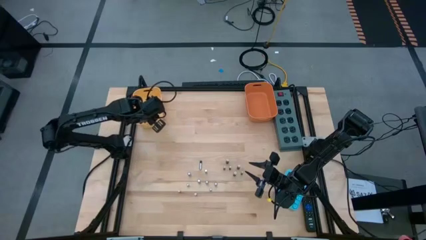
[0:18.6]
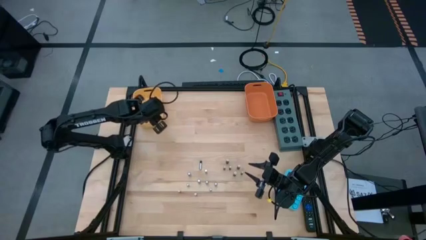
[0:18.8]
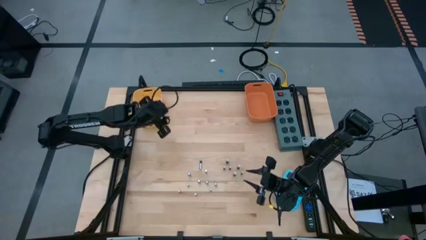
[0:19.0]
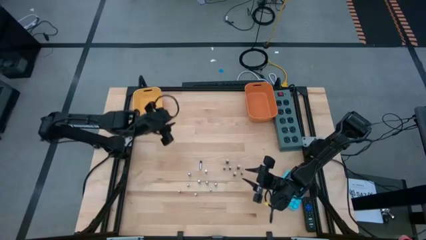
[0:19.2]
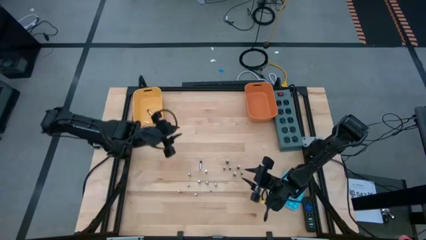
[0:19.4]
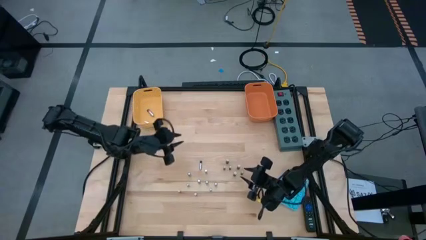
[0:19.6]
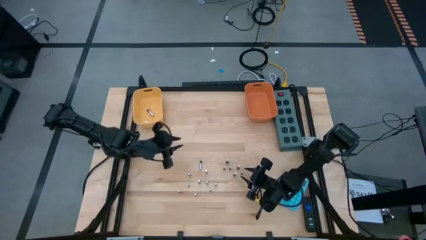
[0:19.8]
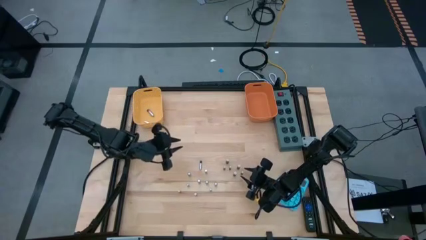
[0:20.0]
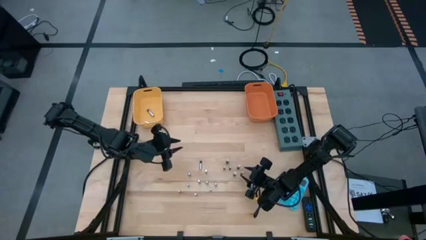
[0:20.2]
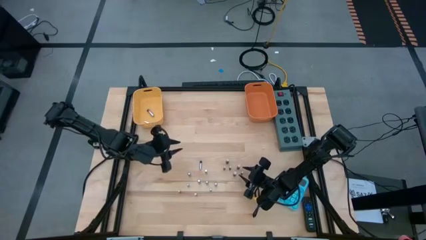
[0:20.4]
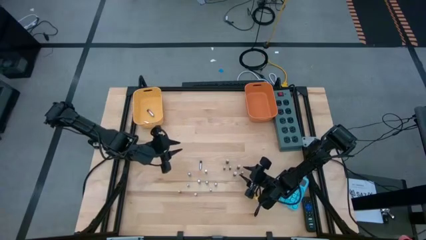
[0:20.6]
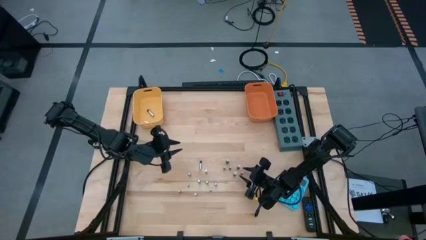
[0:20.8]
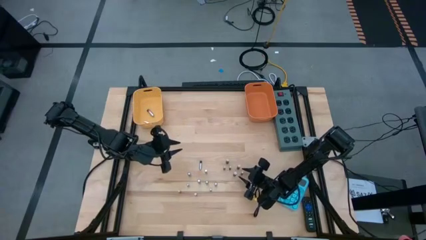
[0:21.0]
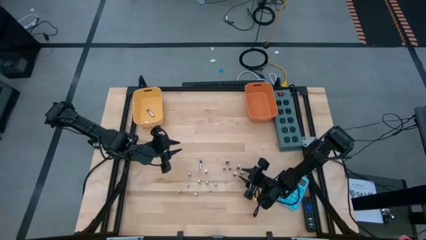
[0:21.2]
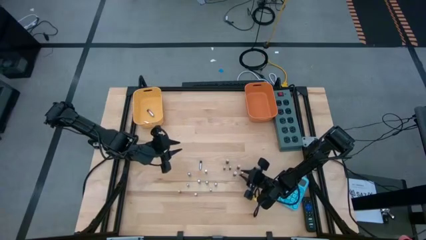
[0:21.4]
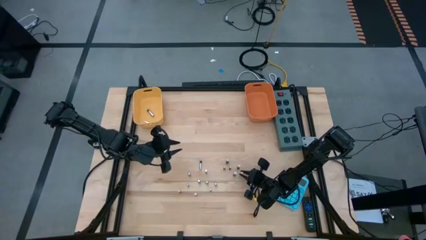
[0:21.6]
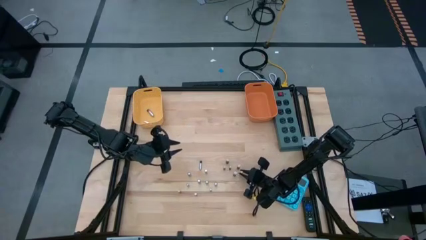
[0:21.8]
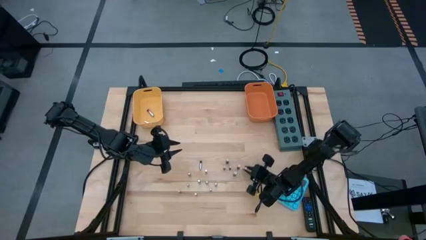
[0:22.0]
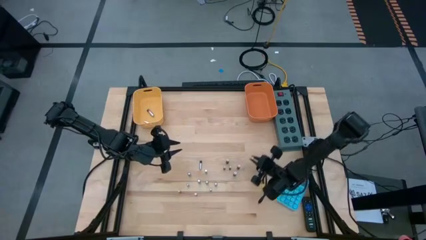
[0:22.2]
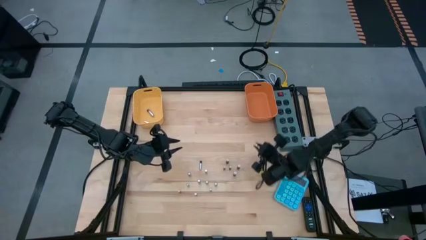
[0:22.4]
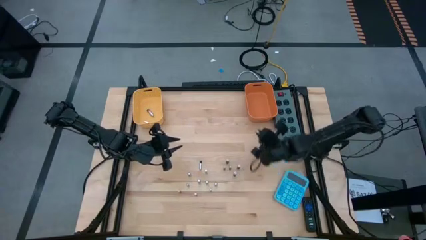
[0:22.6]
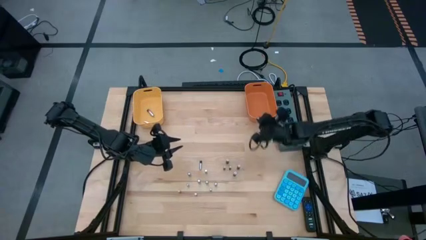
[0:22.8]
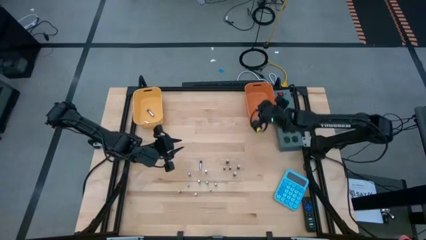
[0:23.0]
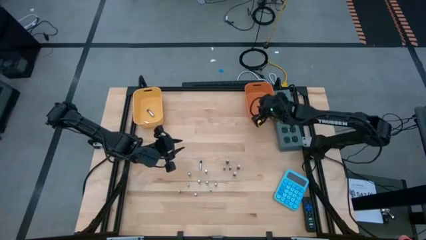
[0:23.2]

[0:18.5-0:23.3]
Task: Sort batteries
Put the black battery into the orange bin

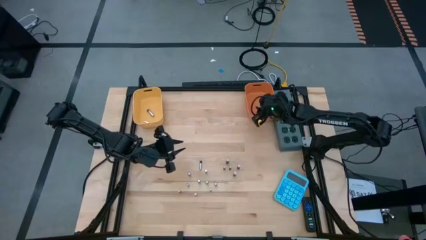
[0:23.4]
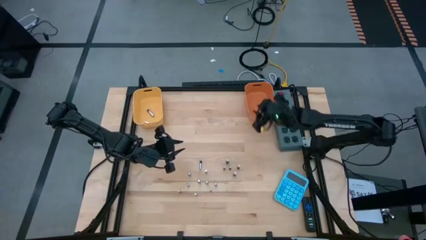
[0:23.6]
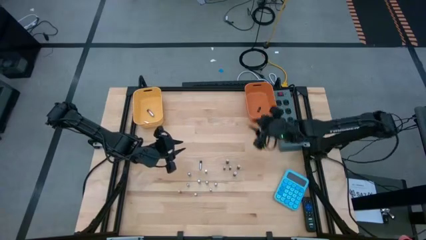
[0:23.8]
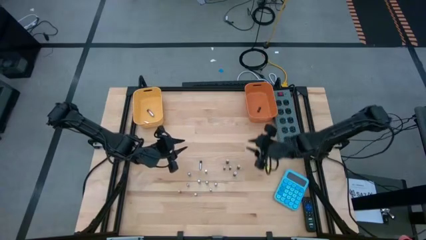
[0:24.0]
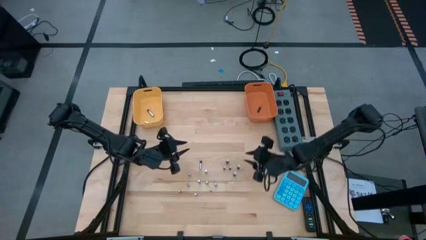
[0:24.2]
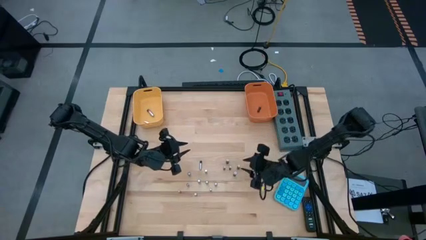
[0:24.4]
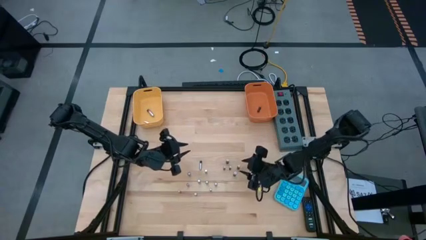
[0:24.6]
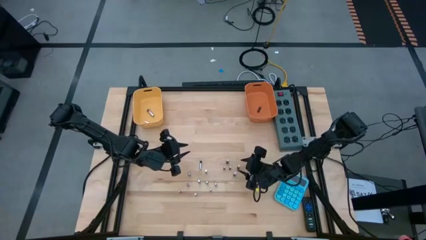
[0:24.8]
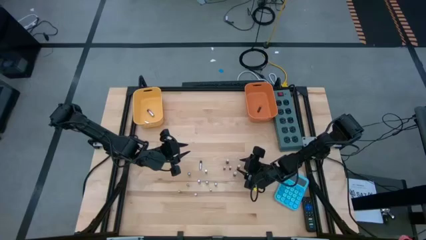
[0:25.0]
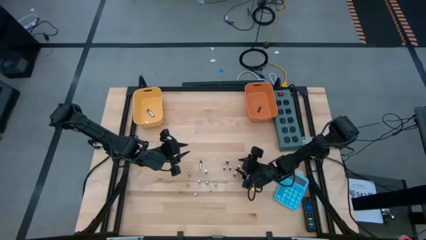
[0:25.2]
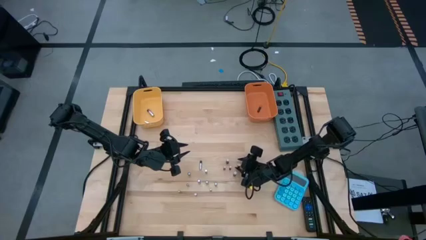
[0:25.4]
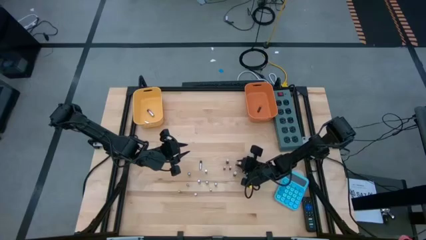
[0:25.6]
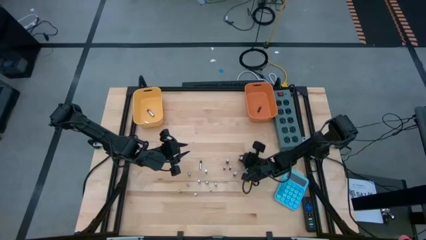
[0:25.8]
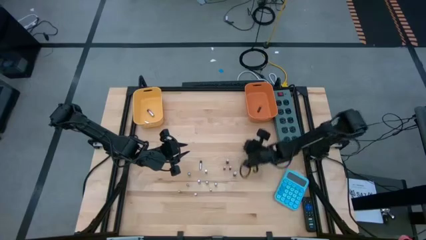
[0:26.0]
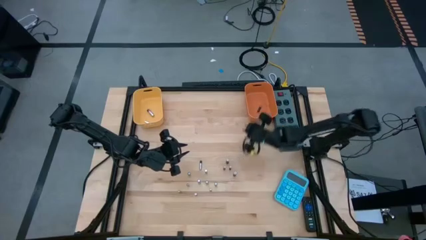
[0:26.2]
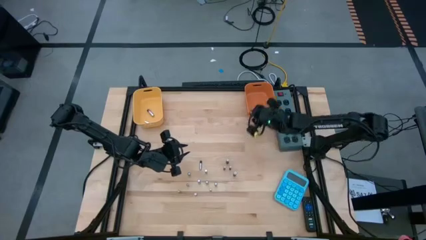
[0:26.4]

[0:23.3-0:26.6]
Put the black battery into the orange bin

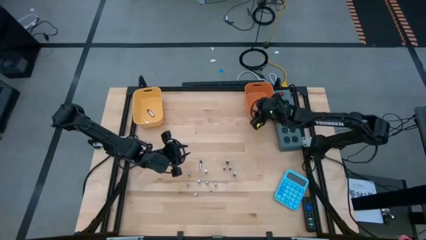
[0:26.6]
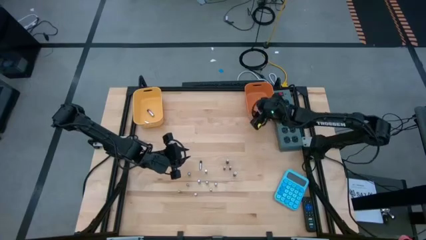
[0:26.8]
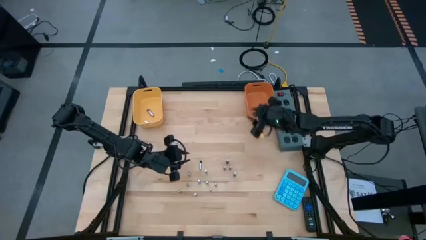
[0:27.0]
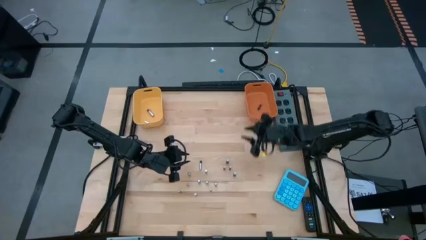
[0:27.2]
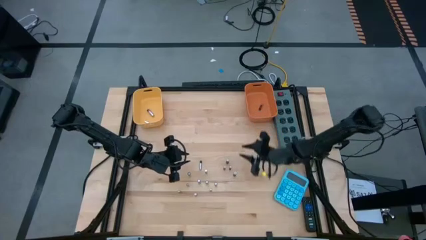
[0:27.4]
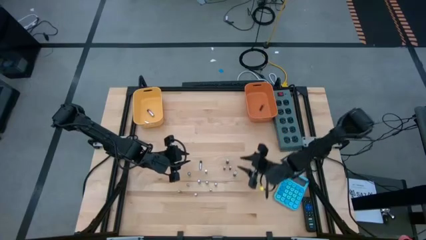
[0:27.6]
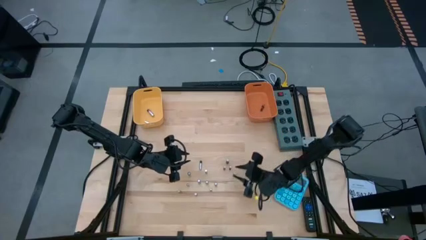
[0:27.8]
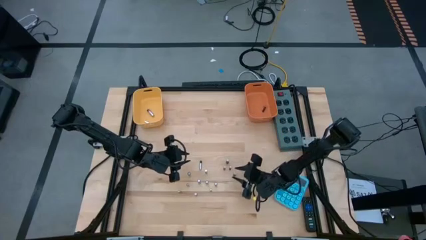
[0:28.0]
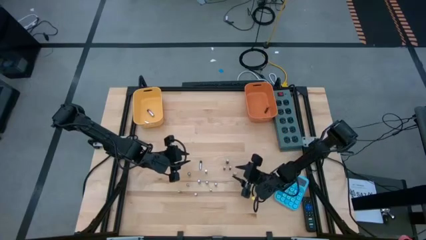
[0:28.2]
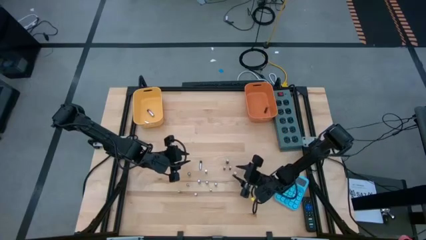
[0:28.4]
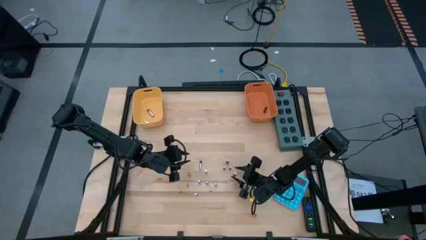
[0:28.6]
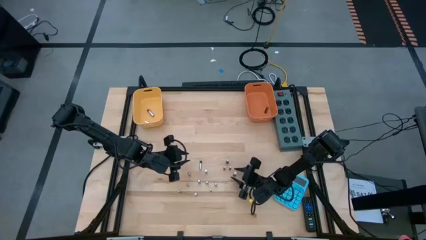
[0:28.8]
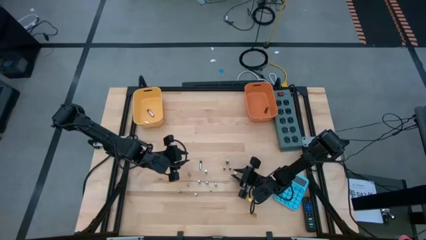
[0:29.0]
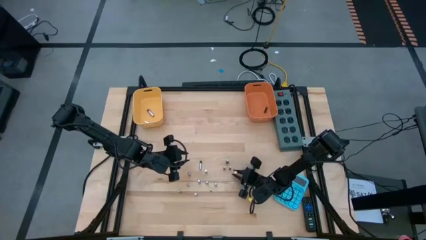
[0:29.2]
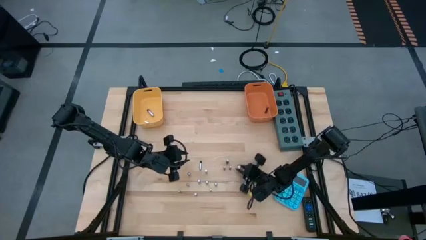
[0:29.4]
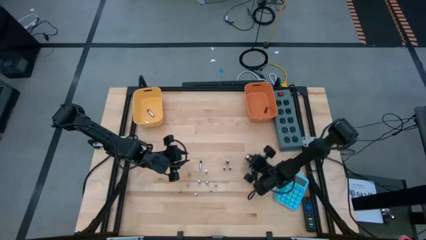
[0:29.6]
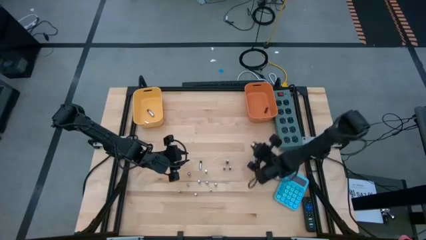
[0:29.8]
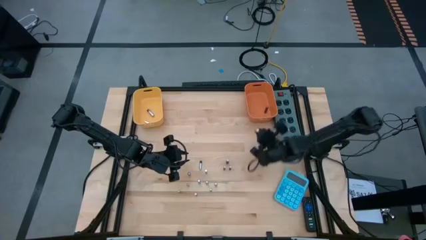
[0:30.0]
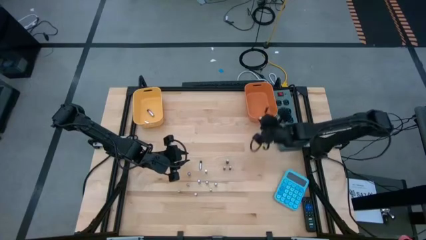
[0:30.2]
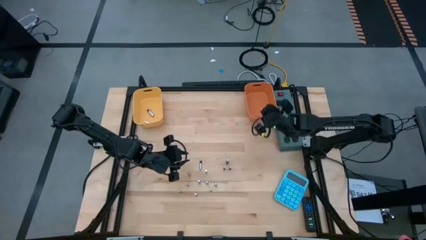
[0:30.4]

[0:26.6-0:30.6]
Put the black battery into the orange bin

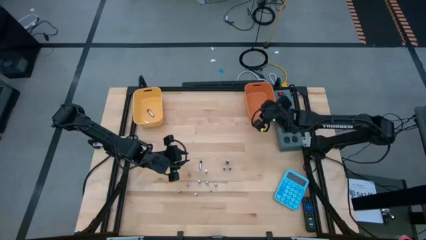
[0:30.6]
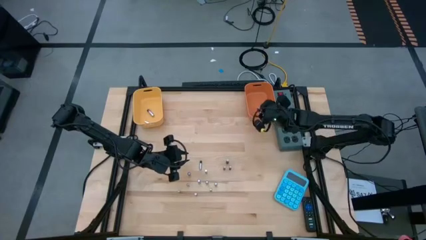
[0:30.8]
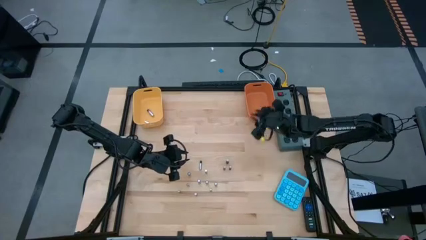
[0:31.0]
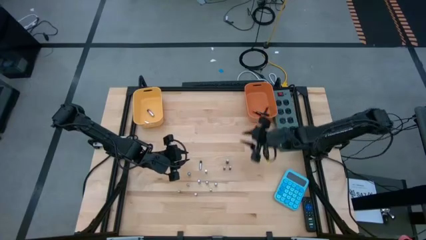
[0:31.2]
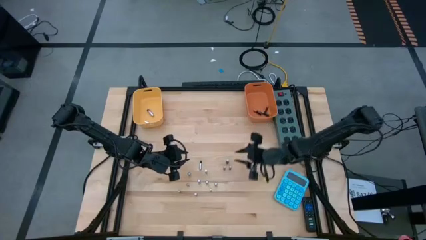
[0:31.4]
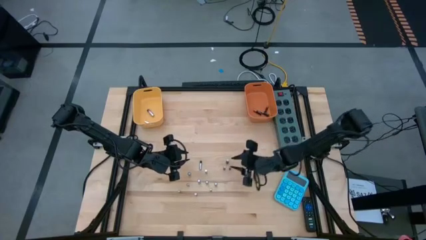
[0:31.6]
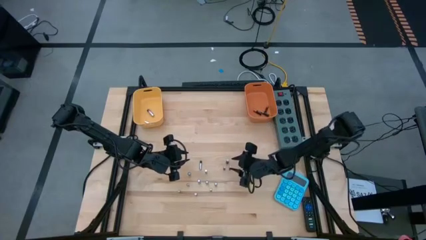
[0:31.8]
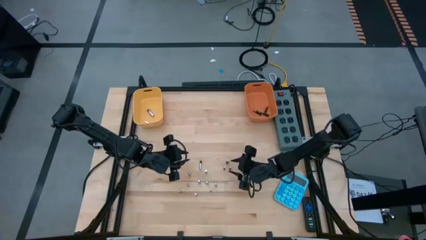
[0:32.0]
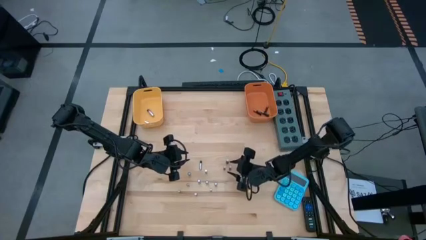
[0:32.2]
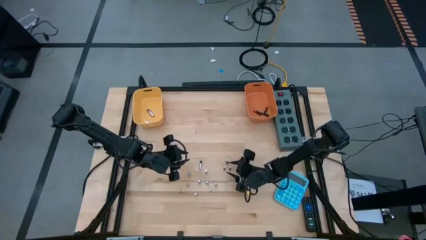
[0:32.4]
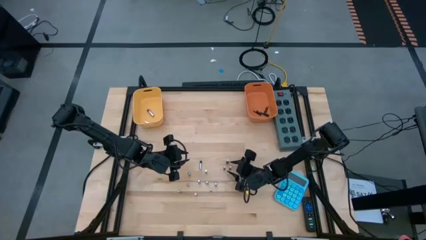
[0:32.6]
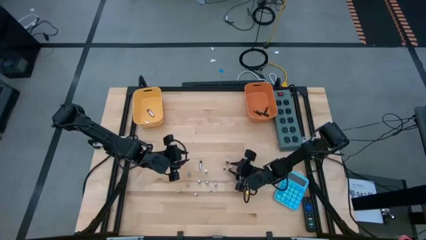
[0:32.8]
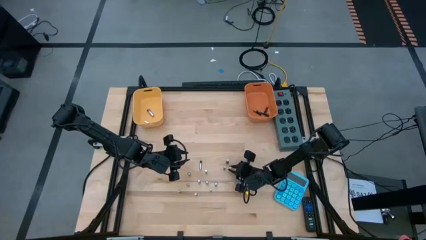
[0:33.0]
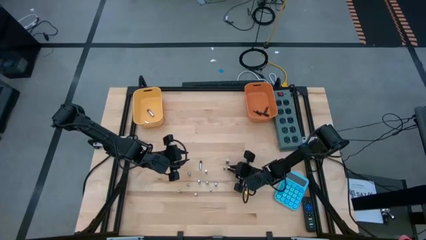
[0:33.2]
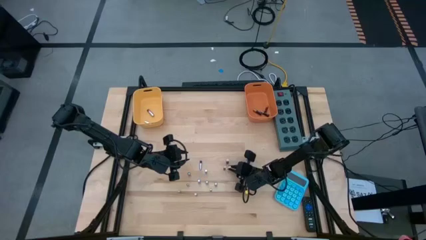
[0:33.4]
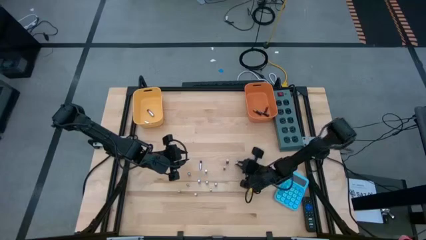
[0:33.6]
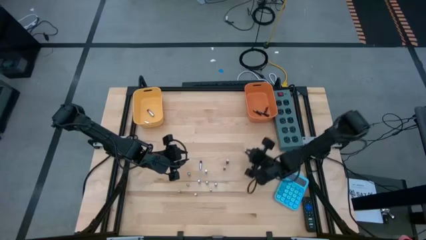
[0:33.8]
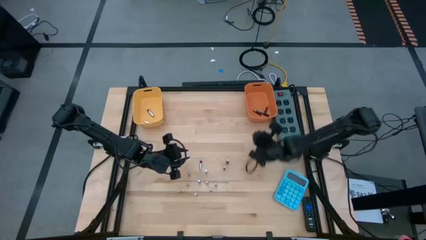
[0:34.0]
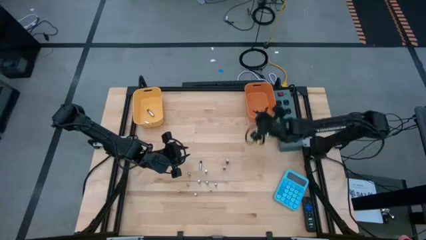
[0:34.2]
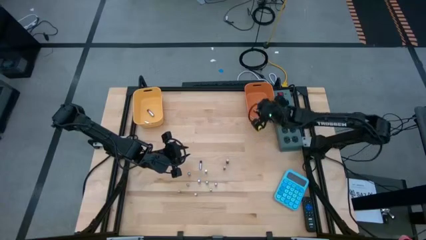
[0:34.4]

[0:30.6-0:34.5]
Put the black battery into the orange bin

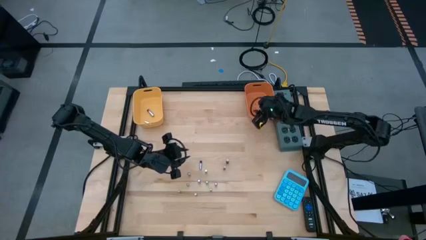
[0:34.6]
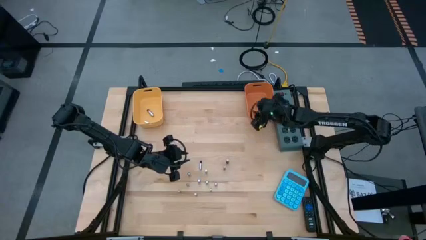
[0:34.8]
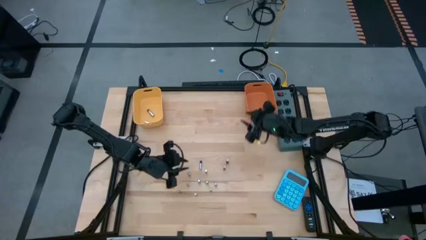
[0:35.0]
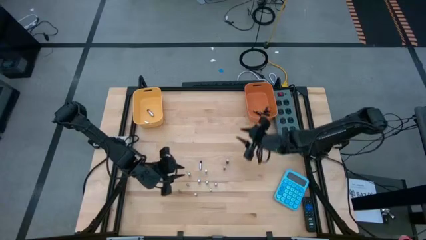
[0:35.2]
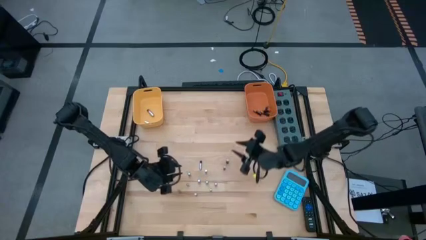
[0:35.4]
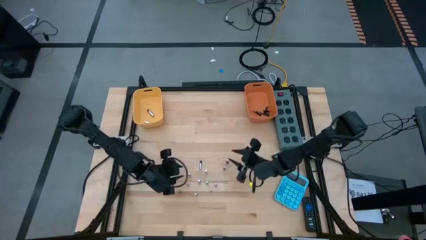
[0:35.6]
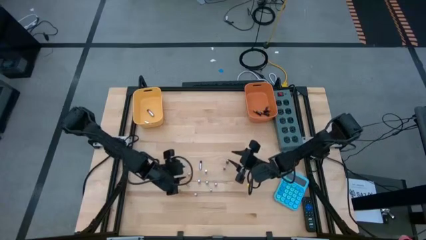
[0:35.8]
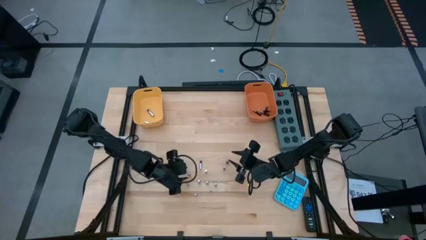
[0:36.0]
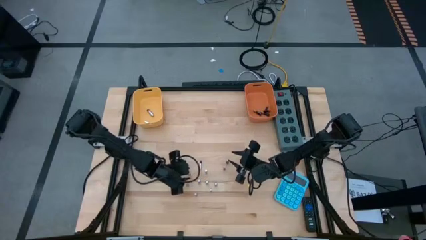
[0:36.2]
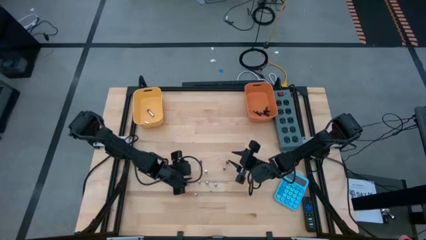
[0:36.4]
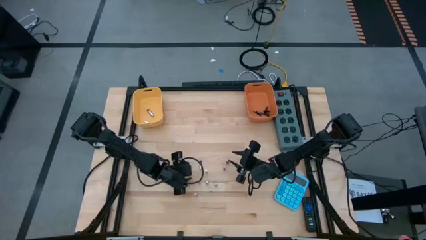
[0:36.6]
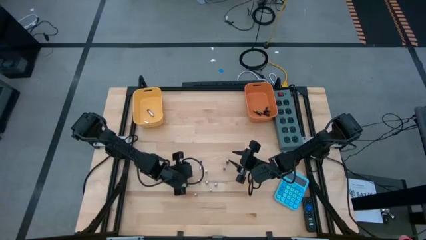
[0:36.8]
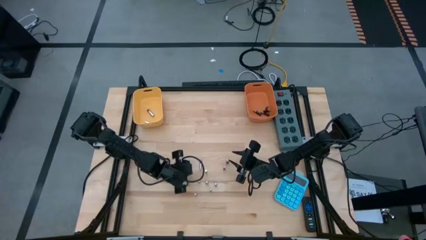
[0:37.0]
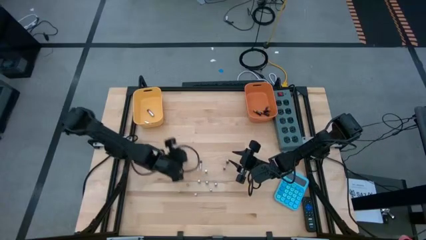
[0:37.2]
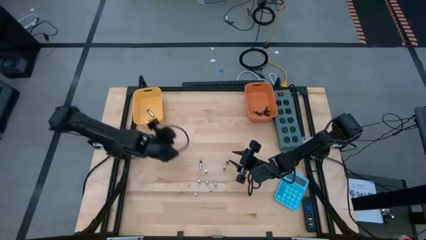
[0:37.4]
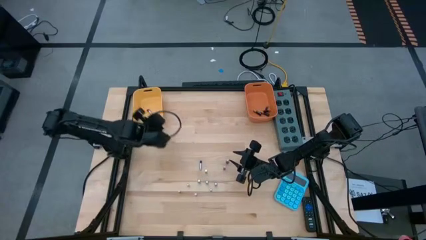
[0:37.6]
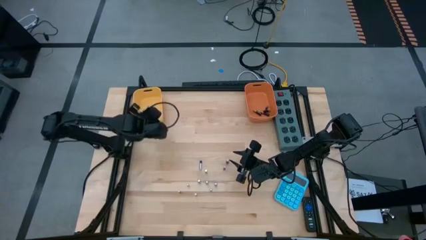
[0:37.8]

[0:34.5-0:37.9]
Put the silver battery into the yellow bin
